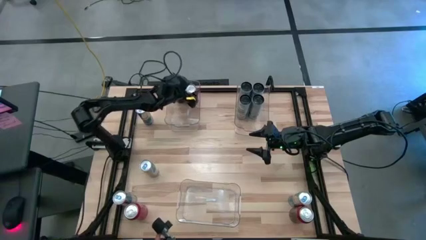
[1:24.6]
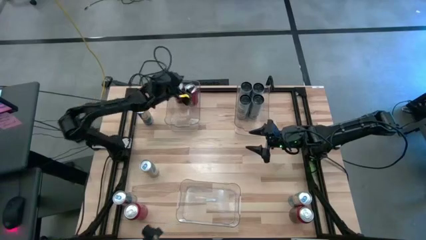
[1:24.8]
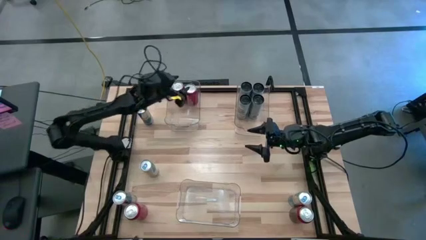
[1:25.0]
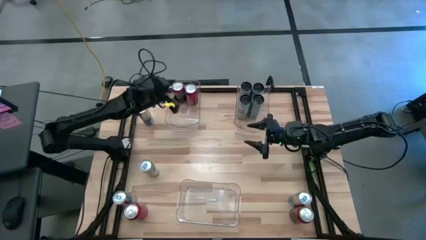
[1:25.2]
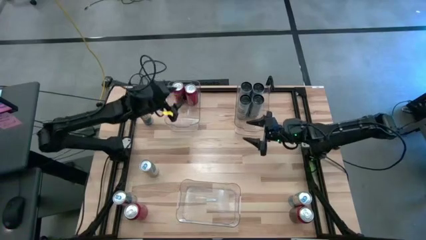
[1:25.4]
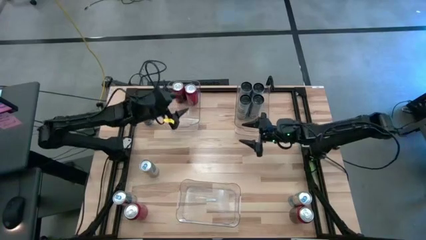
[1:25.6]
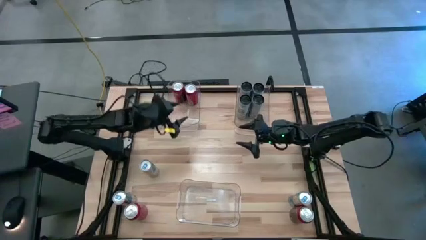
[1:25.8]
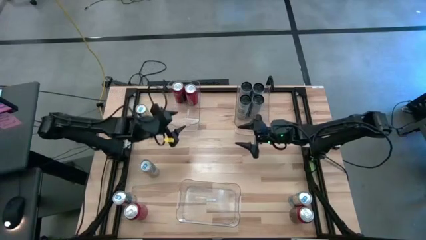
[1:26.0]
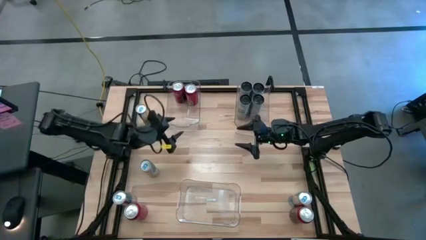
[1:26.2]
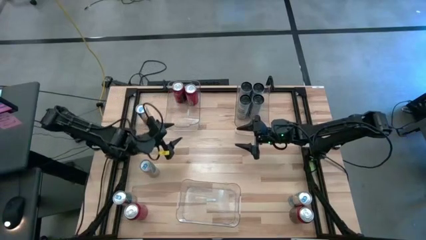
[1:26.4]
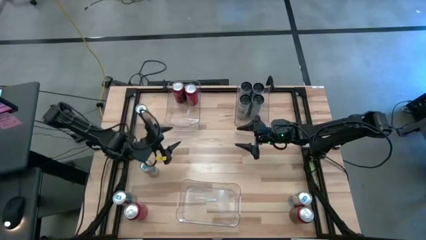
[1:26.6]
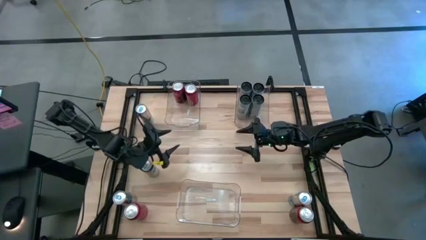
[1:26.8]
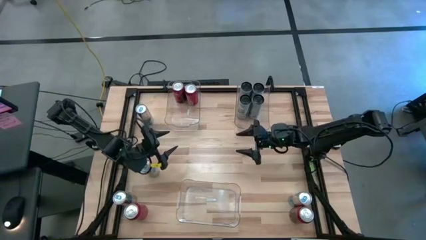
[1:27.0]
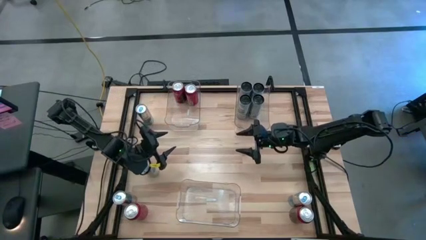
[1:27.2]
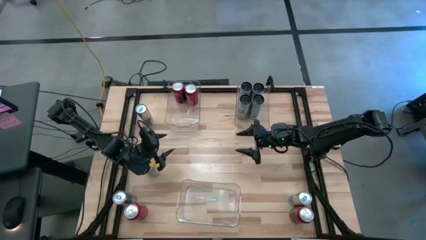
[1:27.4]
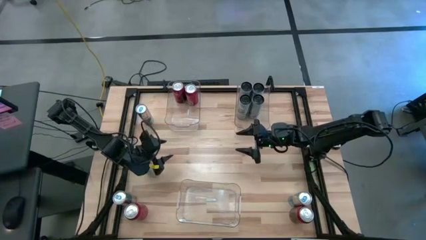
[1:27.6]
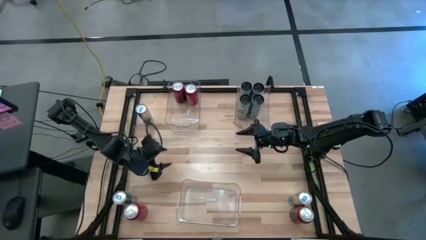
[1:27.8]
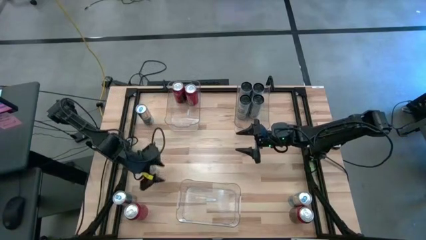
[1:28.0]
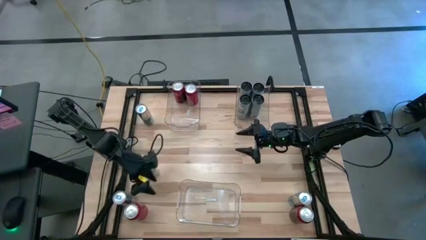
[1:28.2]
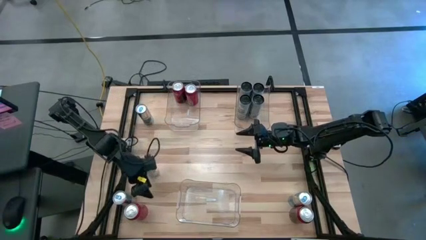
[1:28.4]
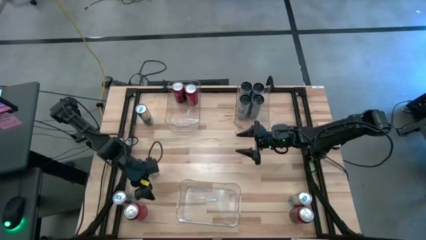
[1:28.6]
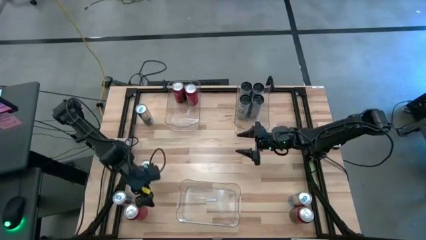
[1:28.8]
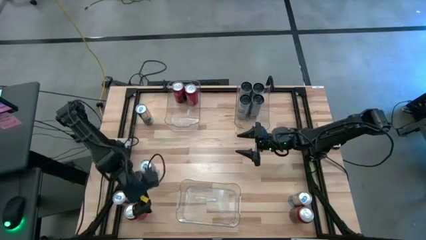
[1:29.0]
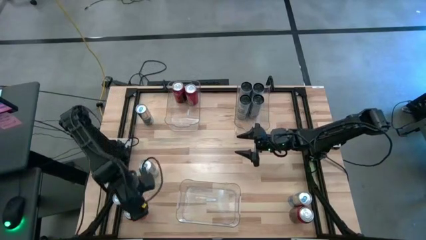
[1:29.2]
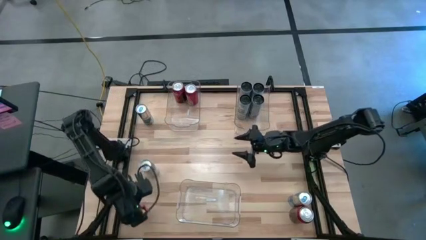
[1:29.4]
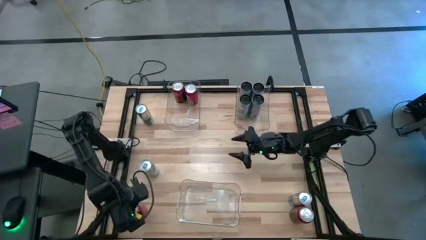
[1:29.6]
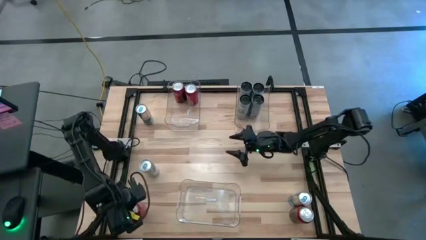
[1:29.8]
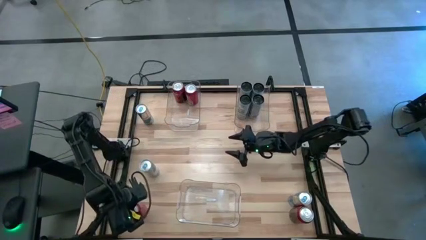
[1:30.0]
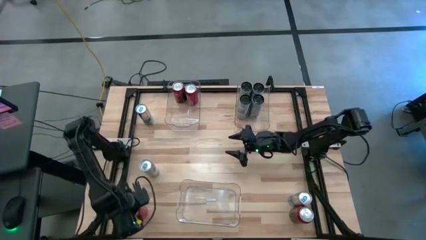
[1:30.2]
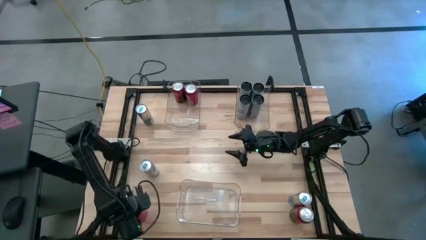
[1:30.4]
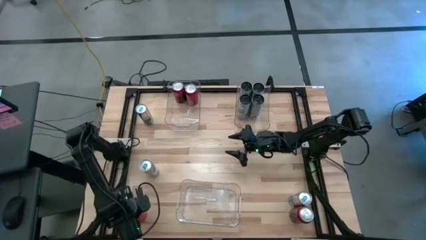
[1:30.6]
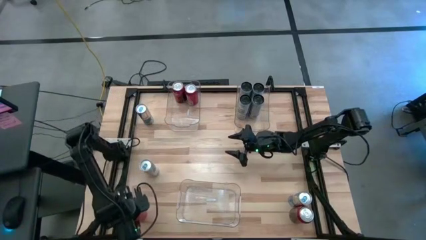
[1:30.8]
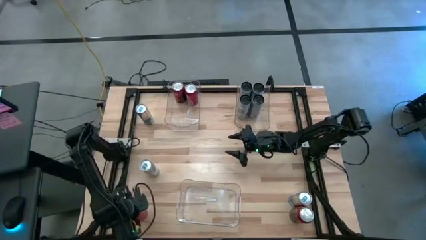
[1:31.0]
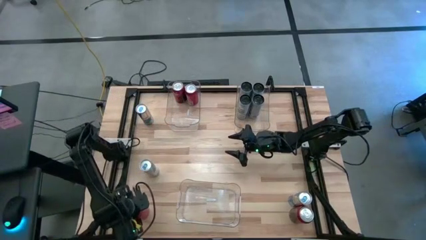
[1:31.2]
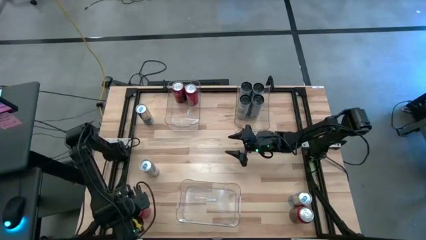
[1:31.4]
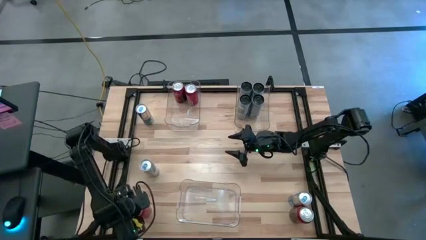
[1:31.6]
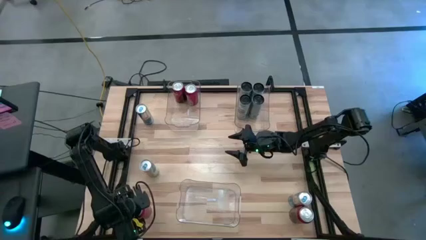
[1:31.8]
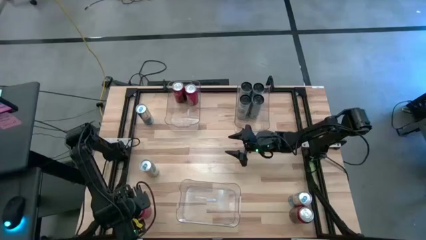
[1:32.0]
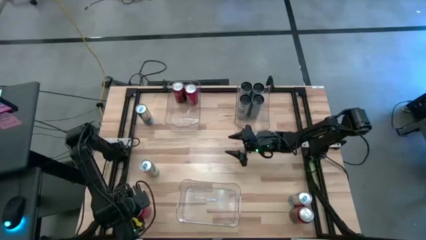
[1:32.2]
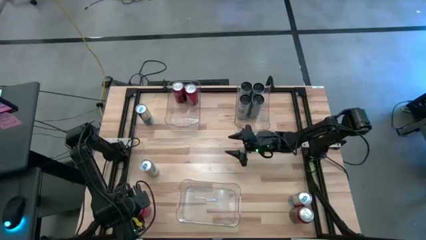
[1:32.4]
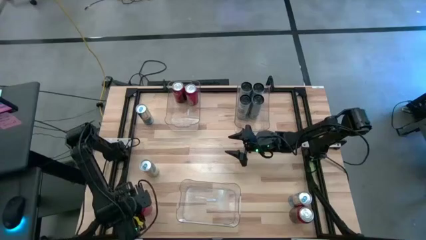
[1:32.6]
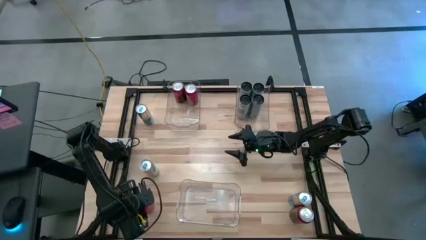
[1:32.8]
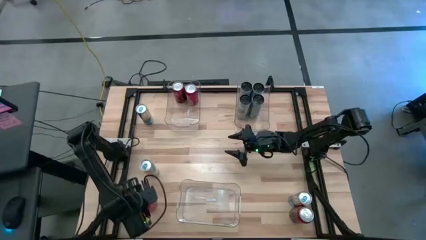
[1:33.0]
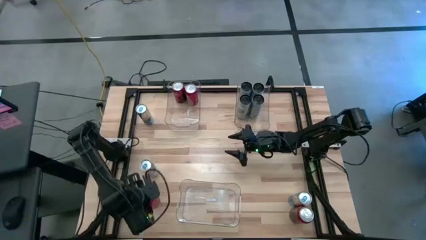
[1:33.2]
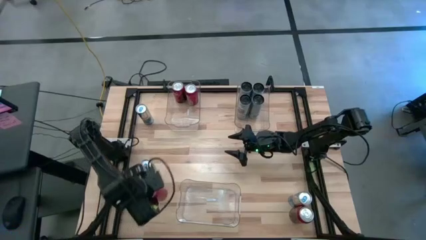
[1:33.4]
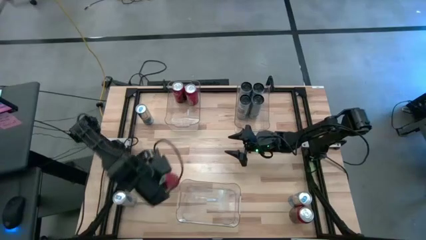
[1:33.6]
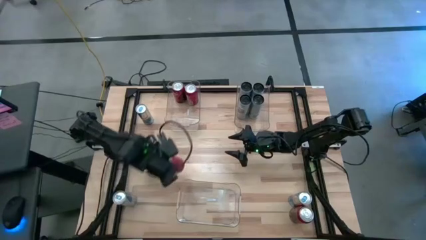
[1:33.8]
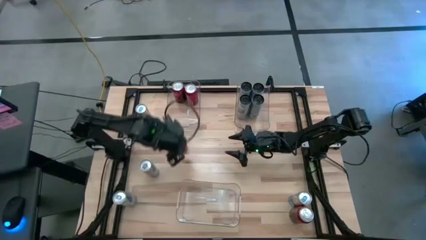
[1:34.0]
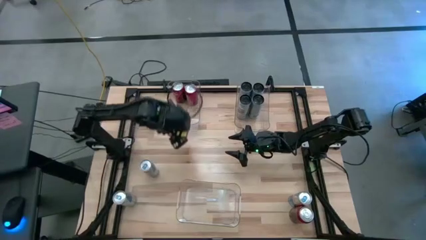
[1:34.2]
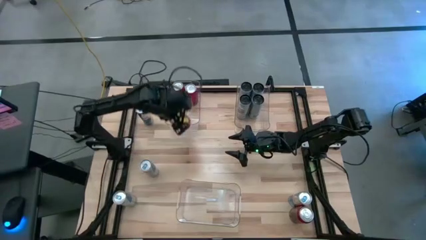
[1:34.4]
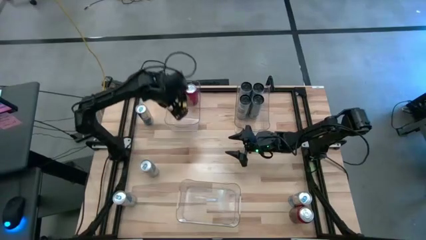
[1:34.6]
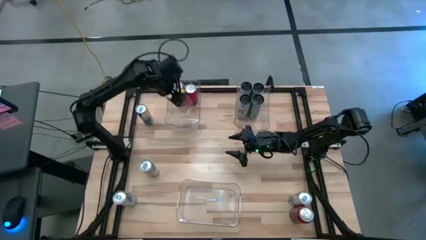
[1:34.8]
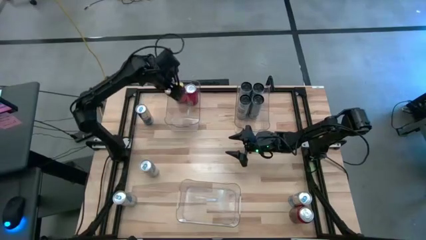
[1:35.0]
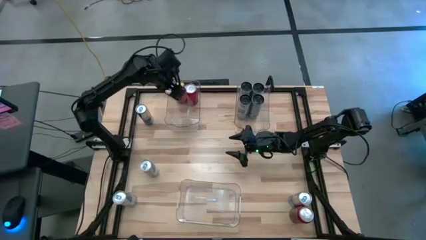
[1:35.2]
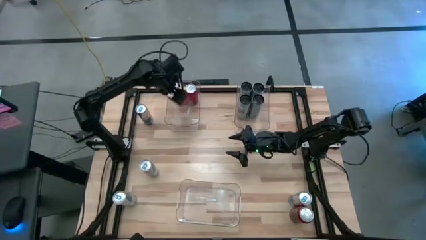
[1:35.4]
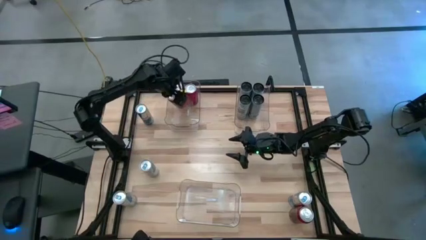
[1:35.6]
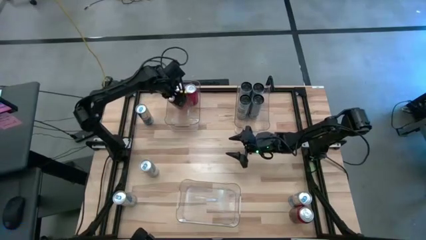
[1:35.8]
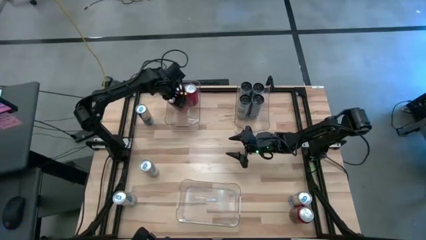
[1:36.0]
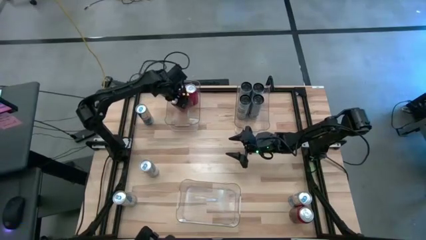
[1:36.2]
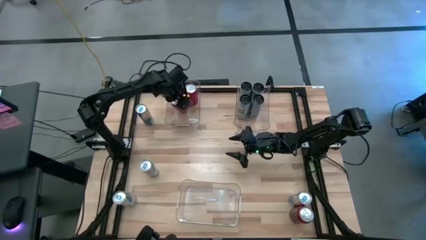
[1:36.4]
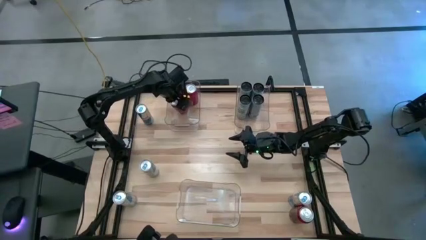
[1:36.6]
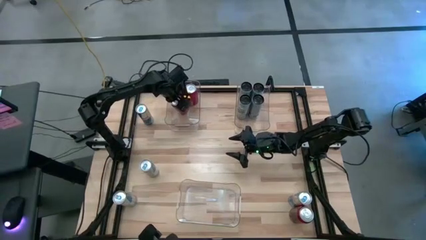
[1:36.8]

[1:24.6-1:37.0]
Task: Sort soda cans
Put the left red soda can into the top left transparent bin

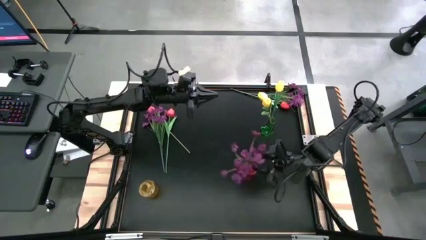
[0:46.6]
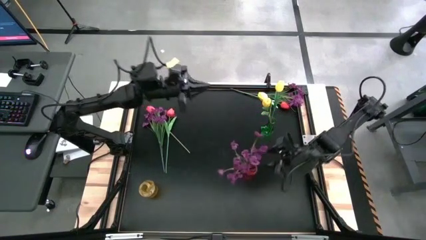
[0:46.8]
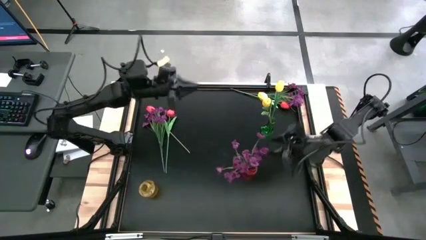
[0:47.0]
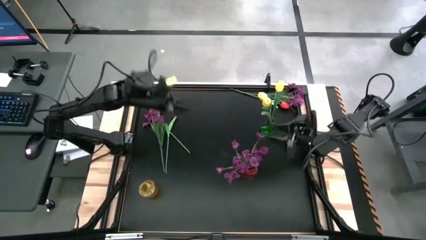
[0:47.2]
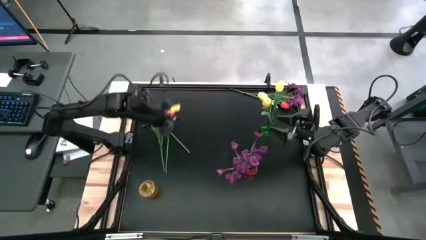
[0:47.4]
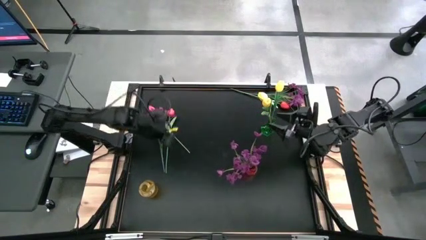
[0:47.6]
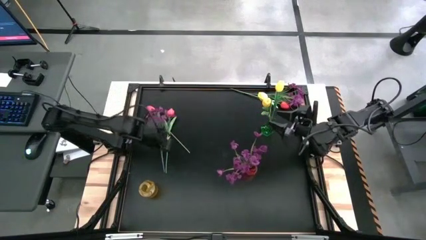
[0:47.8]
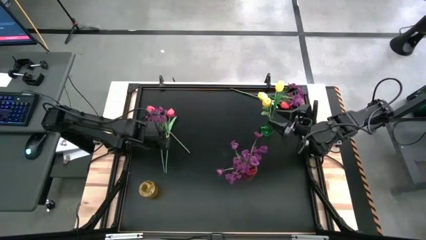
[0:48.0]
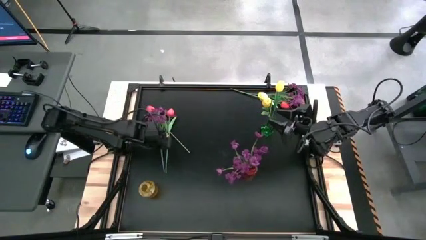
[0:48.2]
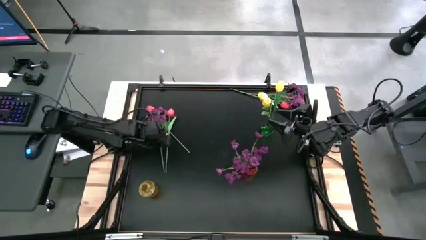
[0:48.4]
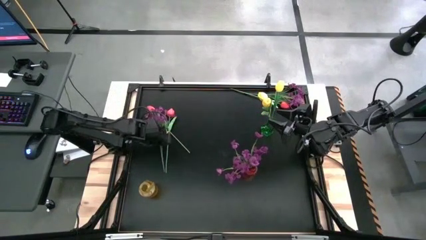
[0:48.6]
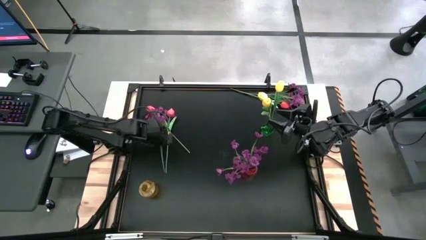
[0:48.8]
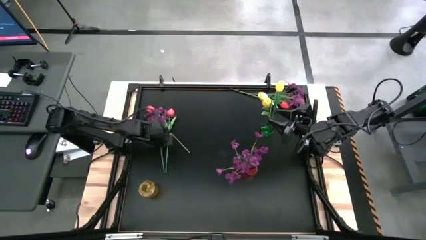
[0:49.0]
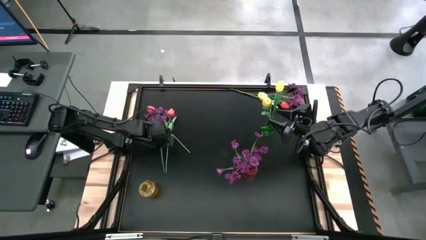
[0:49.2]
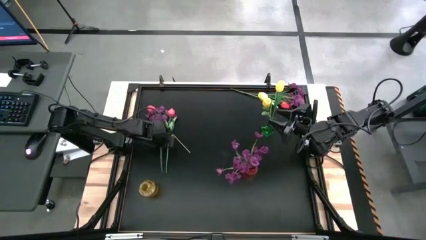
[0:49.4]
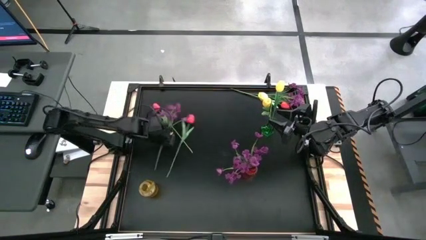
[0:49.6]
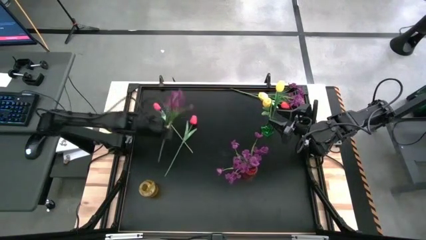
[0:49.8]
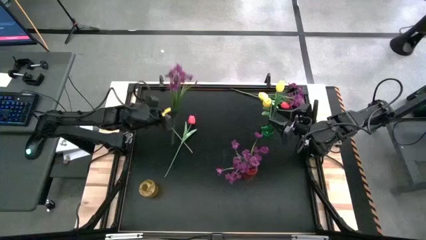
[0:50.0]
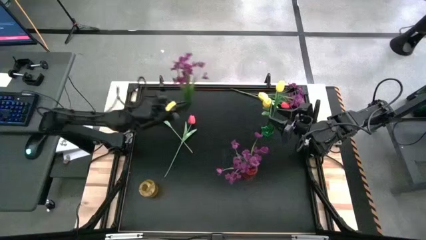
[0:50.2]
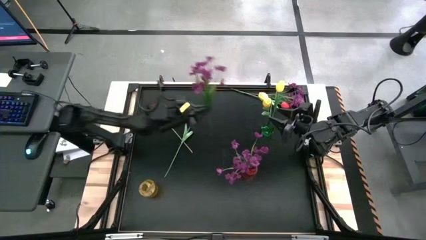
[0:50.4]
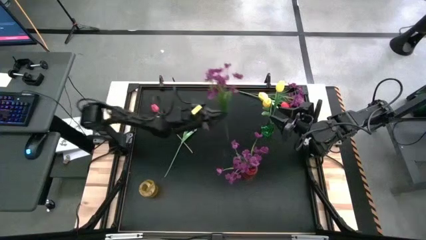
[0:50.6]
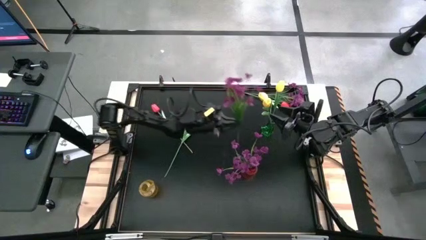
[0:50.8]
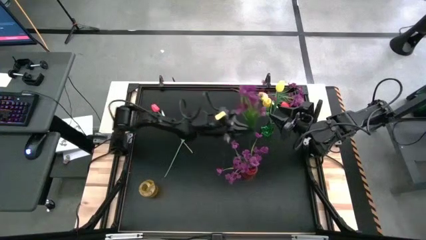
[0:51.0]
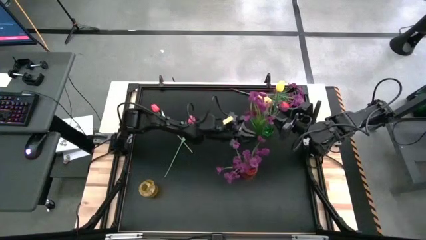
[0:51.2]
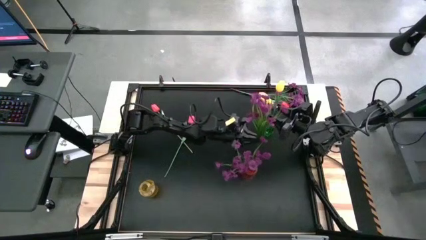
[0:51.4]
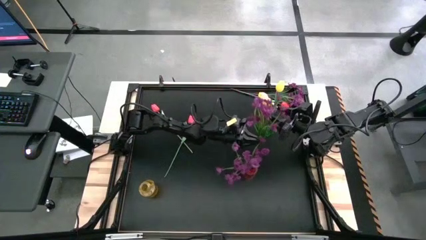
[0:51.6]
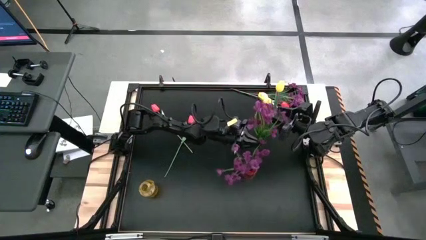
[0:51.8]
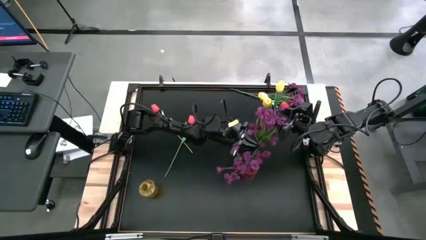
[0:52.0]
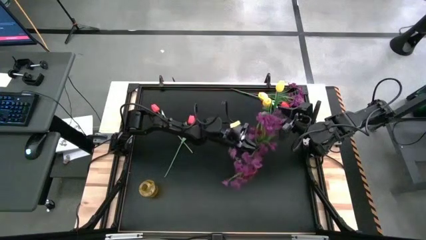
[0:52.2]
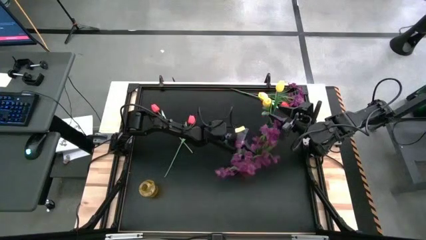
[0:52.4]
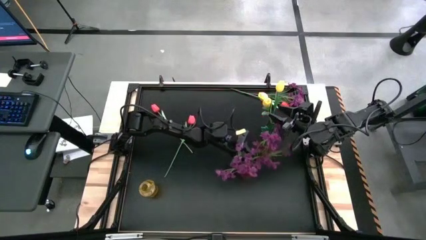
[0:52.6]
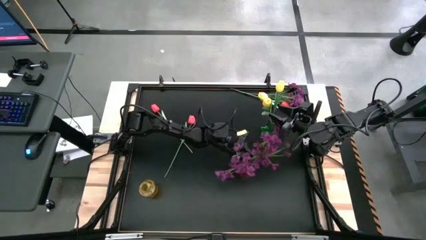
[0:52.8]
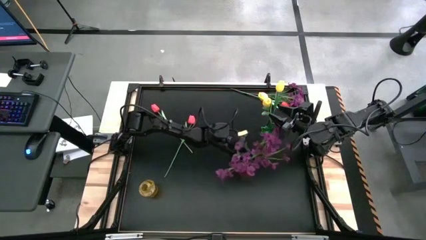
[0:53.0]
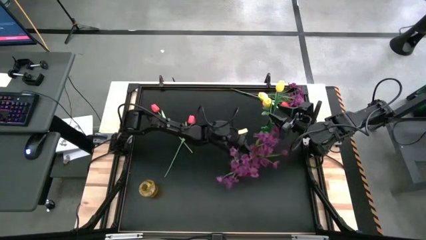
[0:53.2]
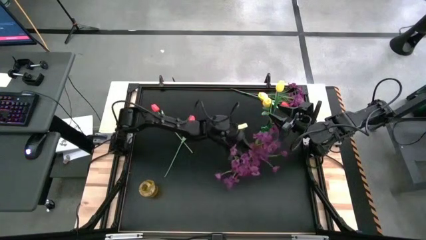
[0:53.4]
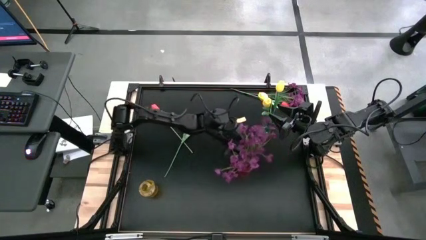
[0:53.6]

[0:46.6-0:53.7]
Task: Sort flowers into vase by color
Put the left purple flowers into the red flower vase
